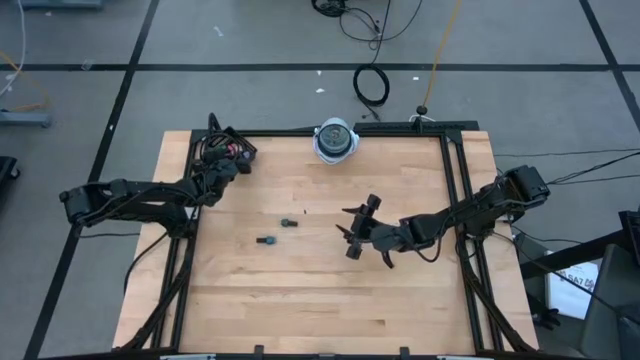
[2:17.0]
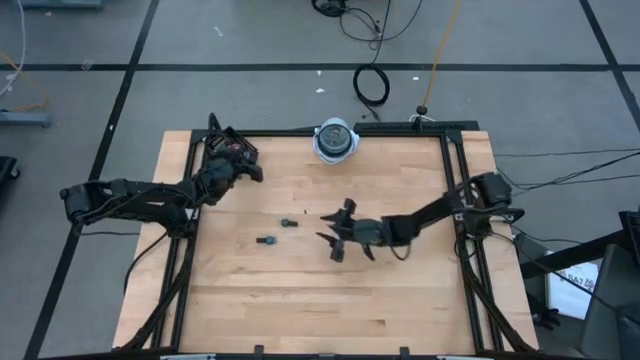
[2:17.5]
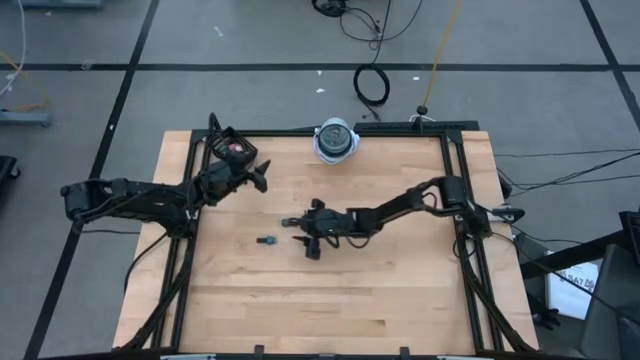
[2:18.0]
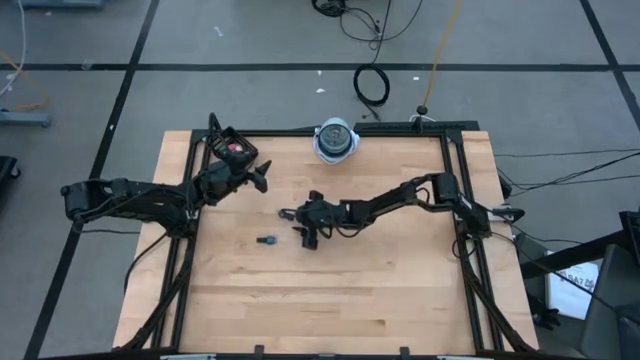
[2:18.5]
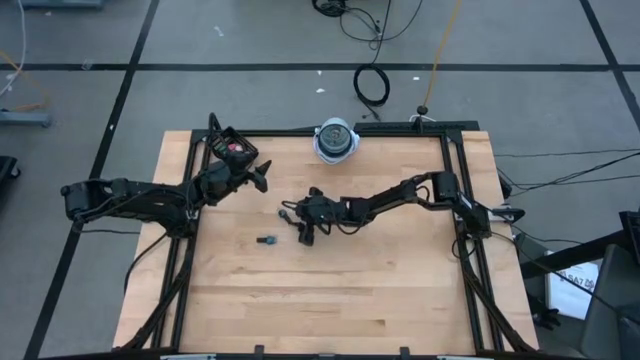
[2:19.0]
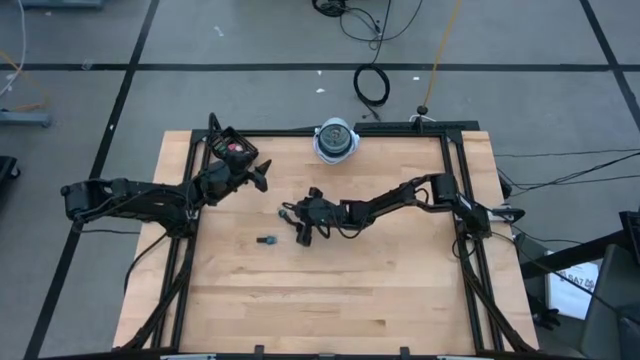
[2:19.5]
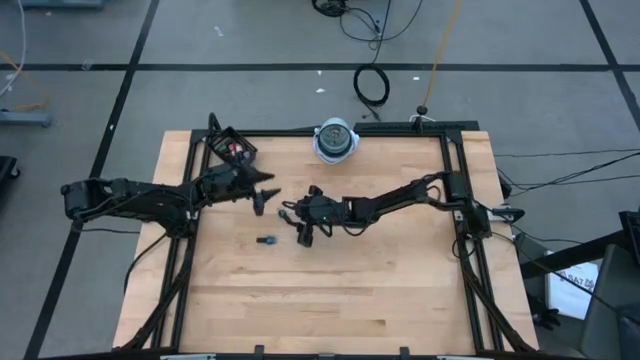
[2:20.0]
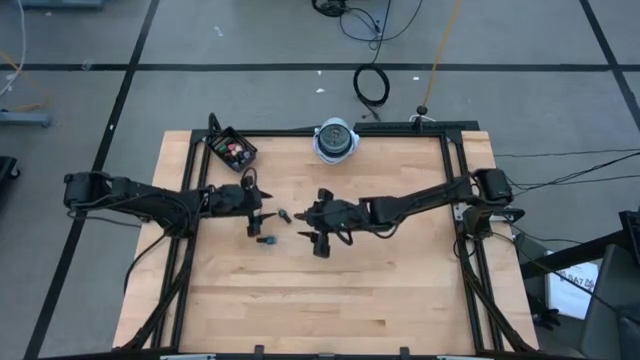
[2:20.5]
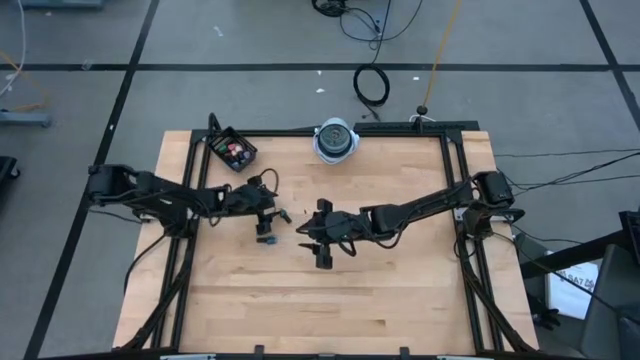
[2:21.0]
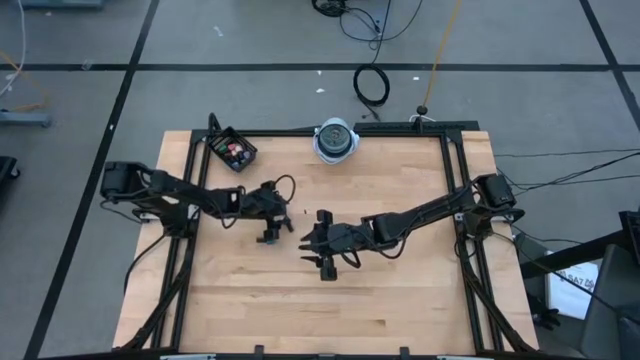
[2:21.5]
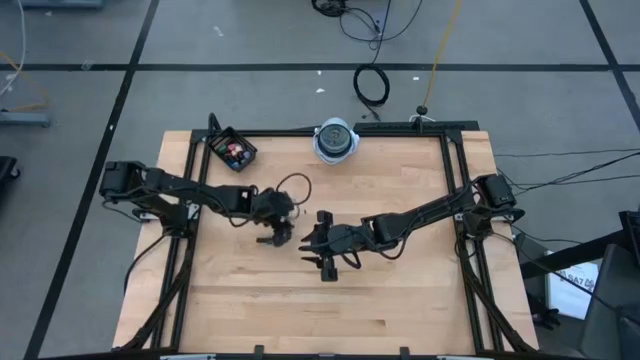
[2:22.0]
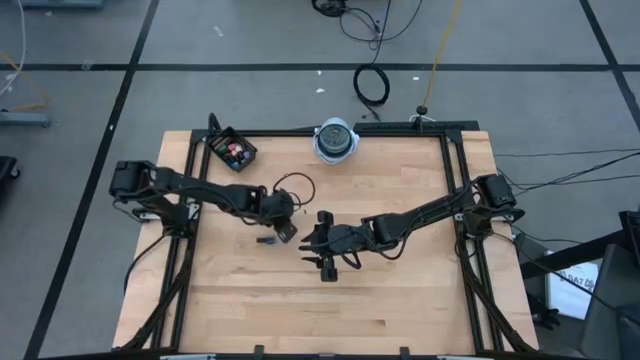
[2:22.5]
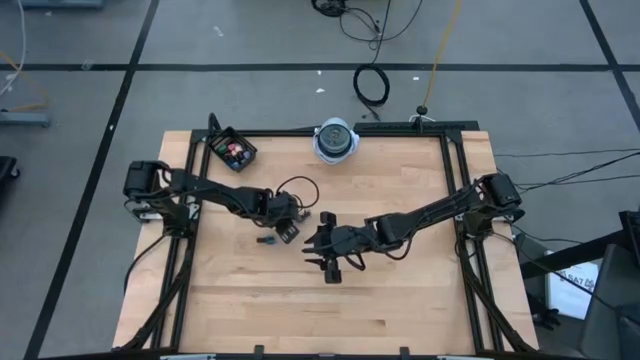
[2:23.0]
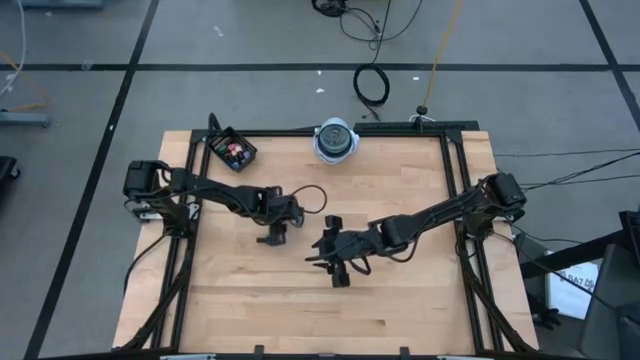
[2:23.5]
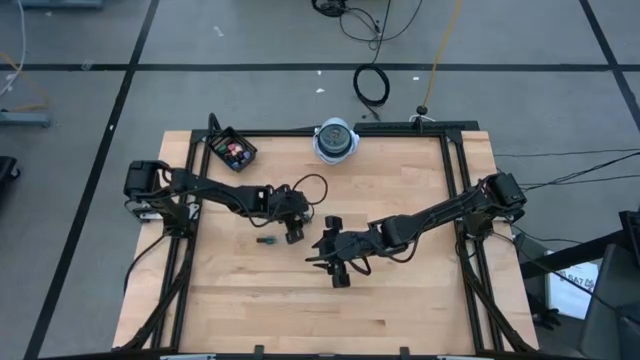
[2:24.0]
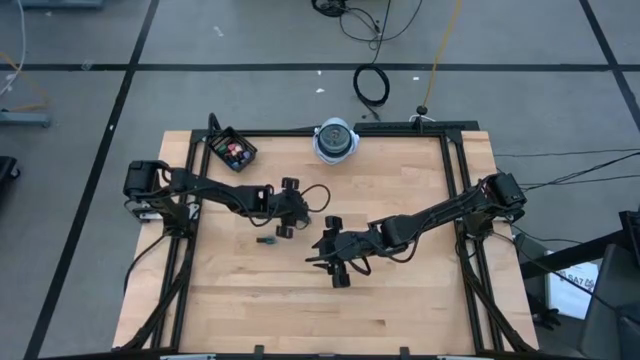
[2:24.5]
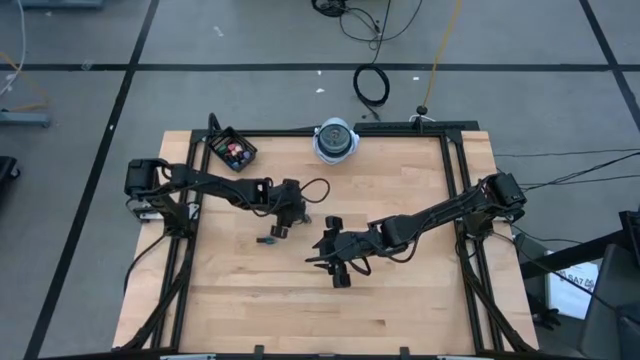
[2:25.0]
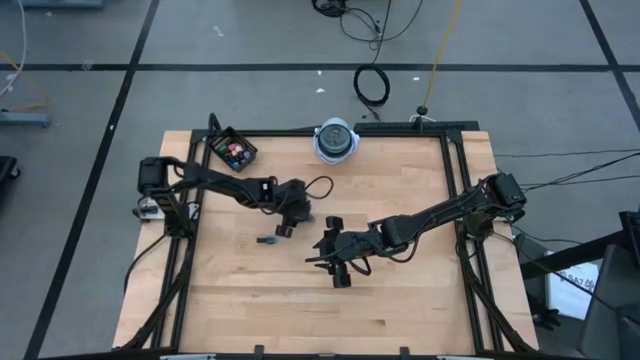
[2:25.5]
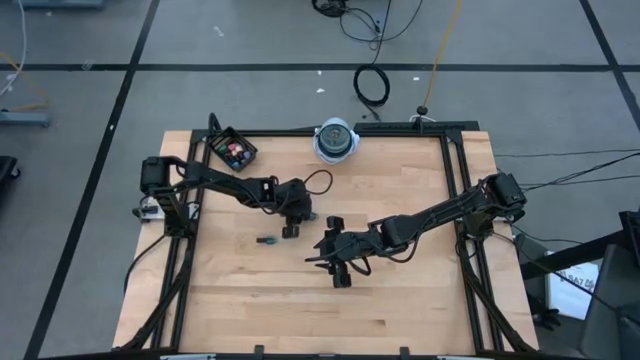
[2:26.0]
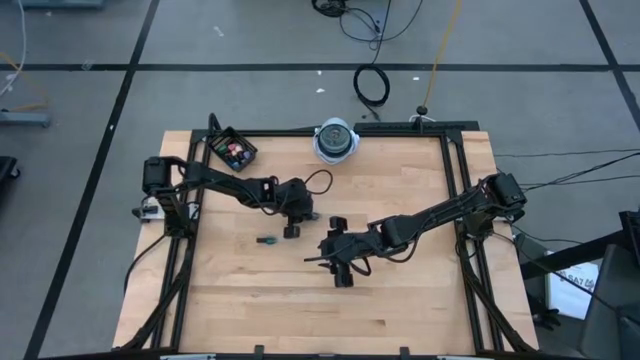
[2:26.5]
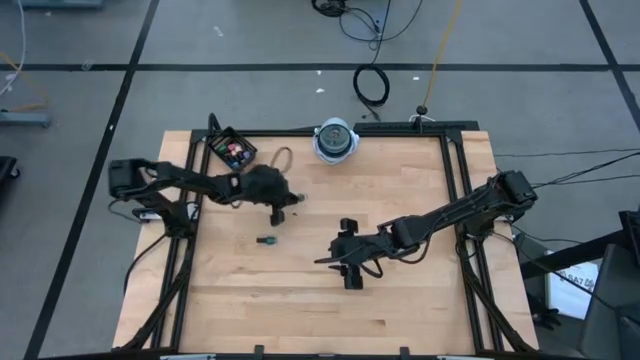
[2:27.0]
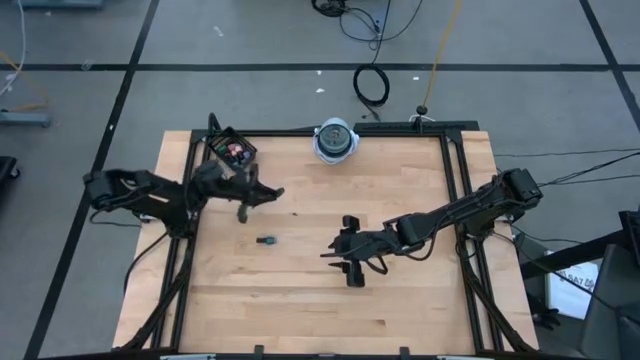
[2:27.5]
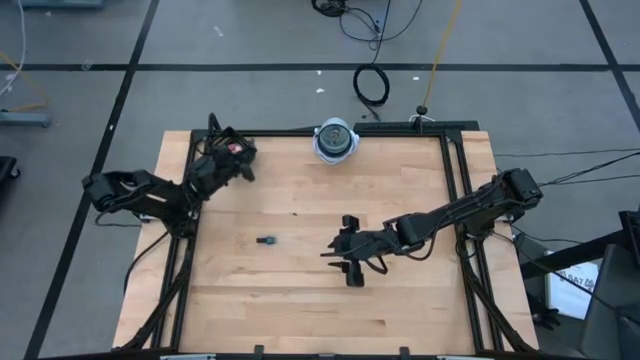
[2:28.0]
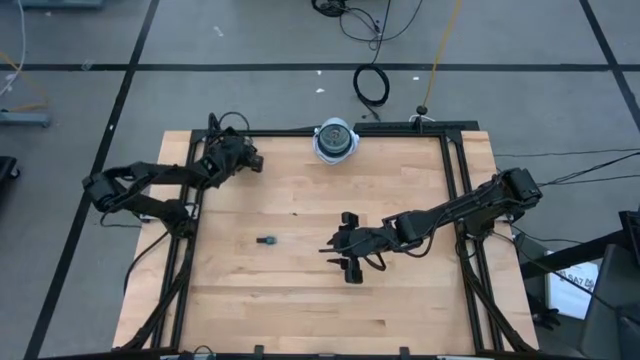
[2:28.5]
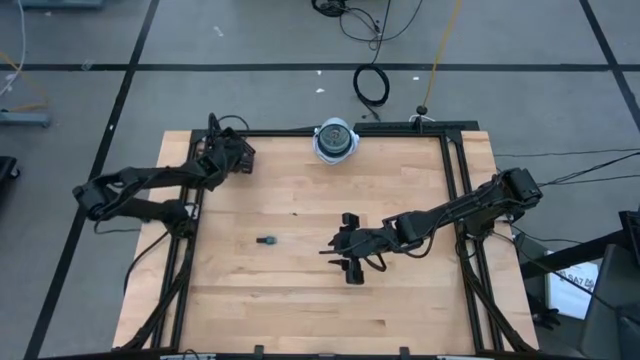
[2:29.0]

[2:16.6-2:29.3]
Task: Pick & Place Nail Polish
Put the dark green nail polish bottle into the black bin

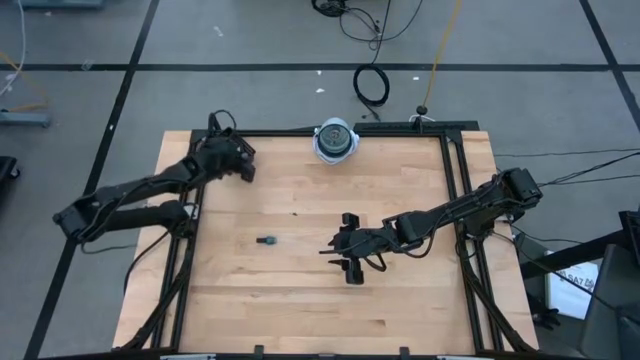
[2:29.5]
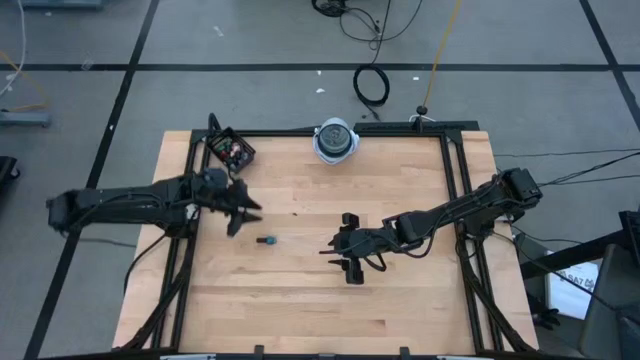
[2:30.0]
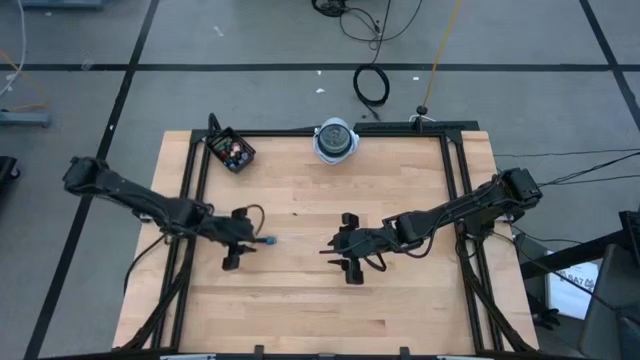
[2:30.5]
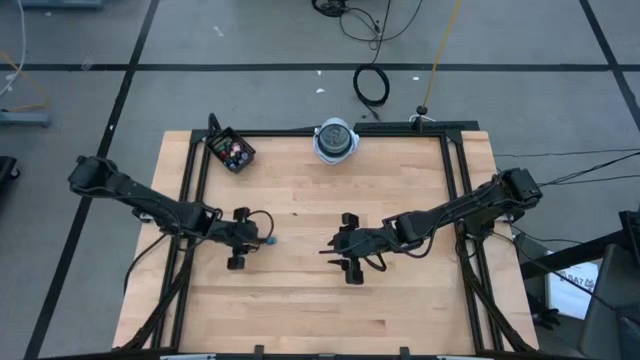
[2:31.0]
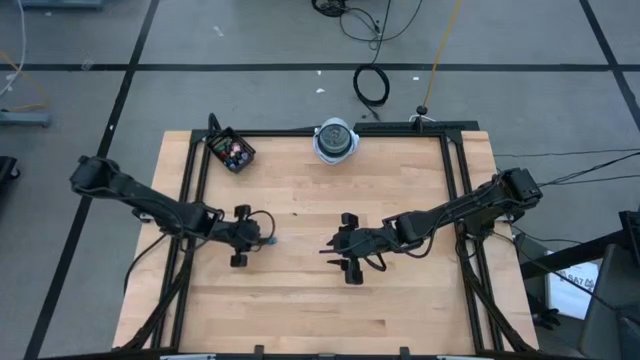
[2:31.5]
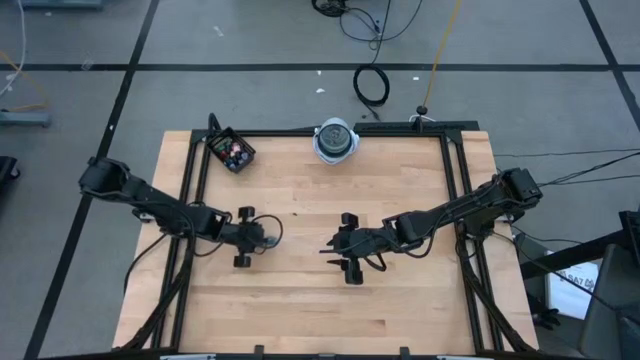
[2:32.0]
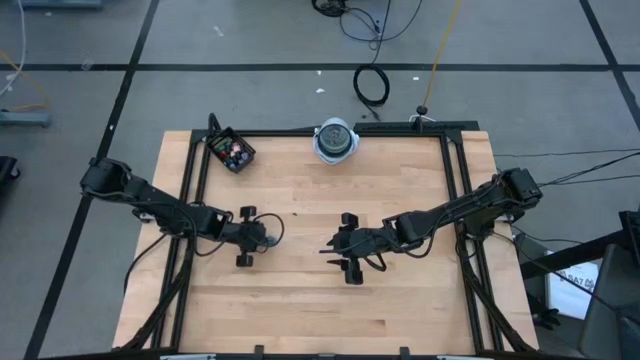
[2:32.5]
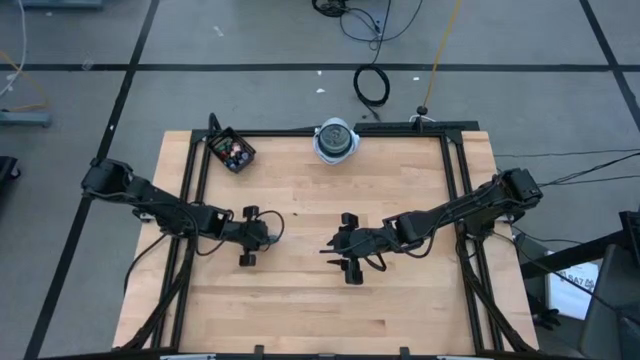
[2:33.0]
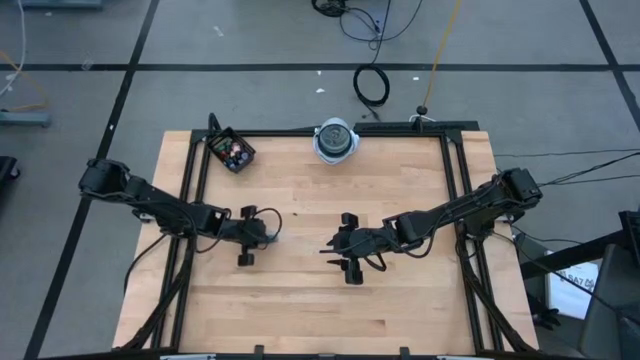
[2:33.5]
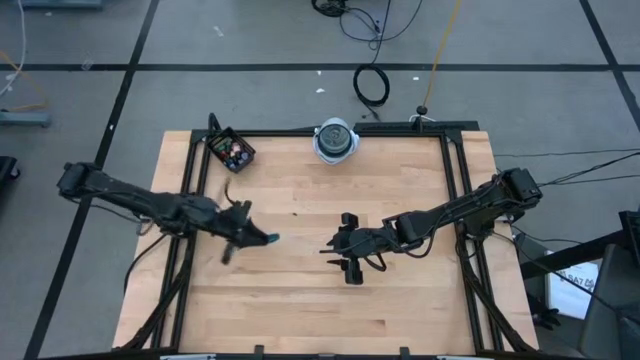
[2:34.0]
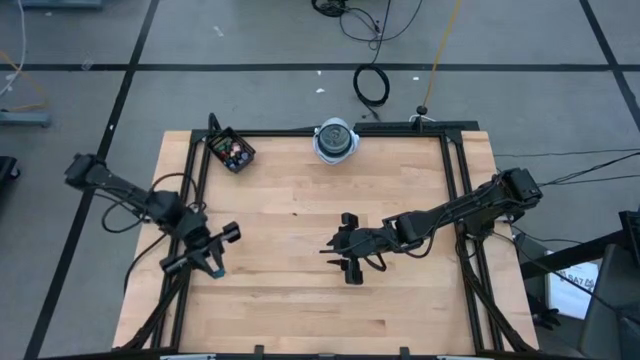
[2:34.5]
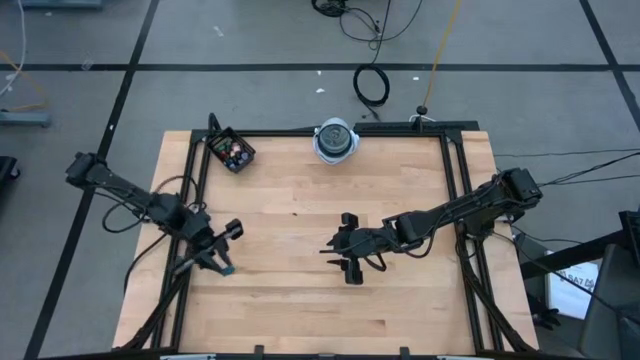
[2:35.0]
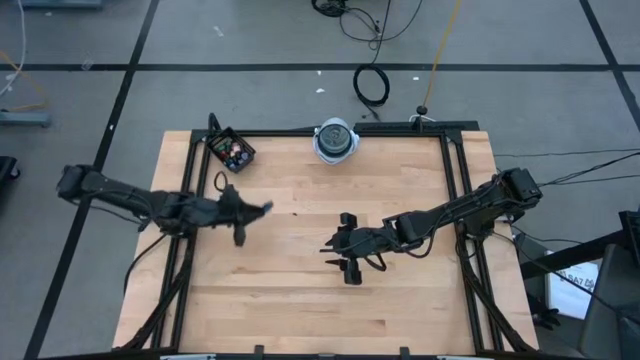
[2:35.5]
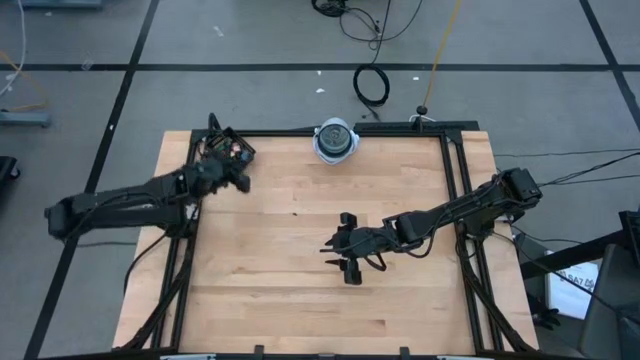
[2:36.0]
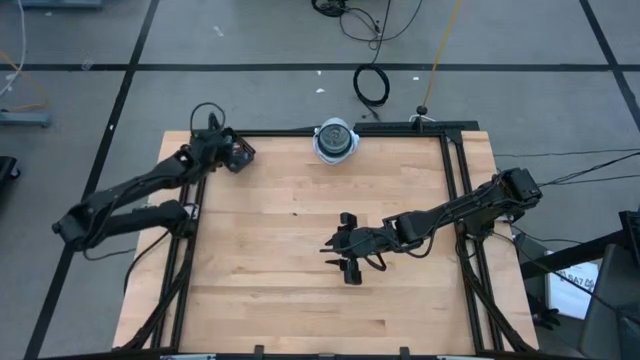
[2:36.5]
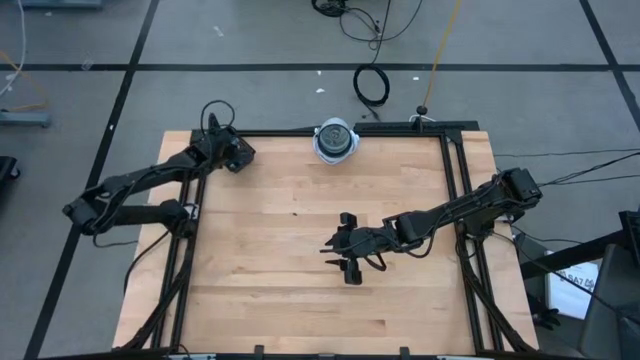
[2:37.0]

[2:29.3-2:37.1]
Put the blue nail polish bottle into the black bin
